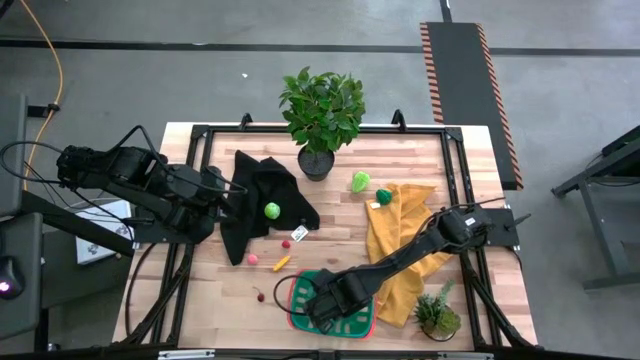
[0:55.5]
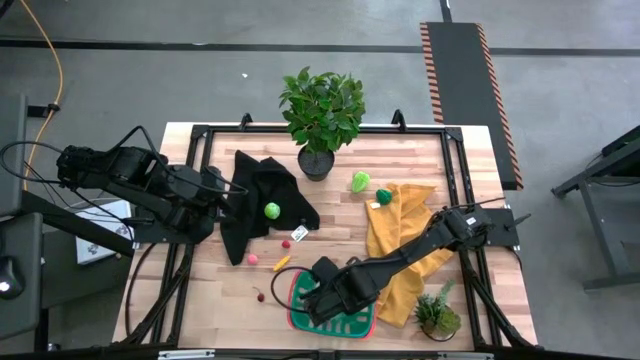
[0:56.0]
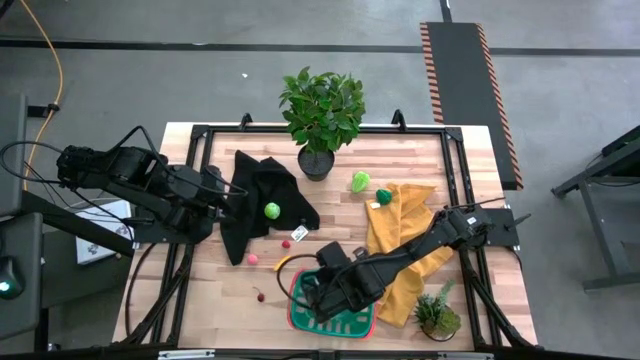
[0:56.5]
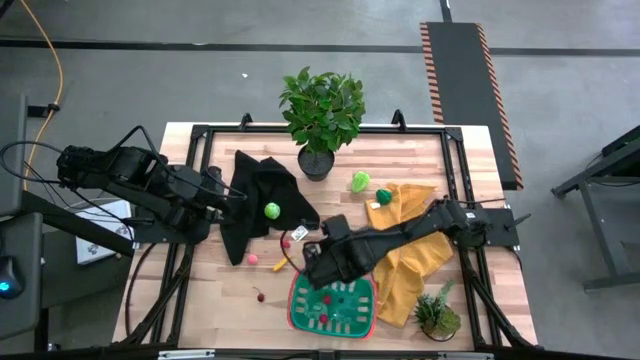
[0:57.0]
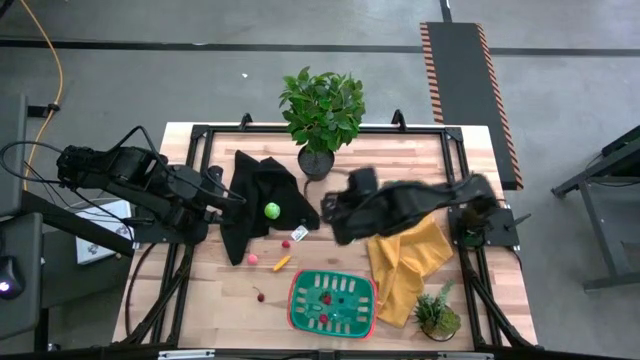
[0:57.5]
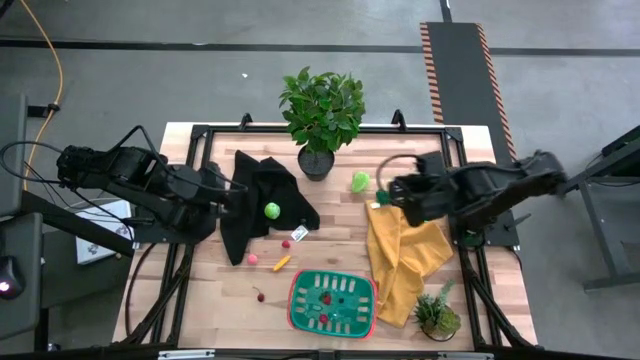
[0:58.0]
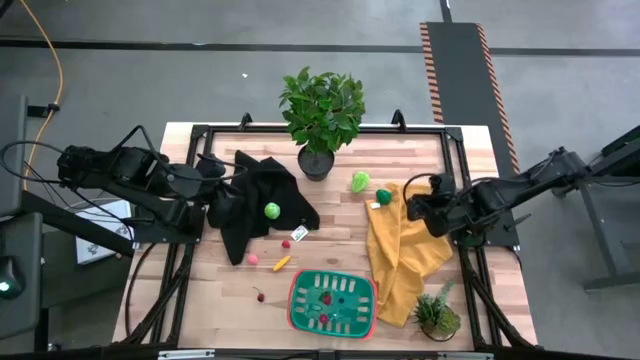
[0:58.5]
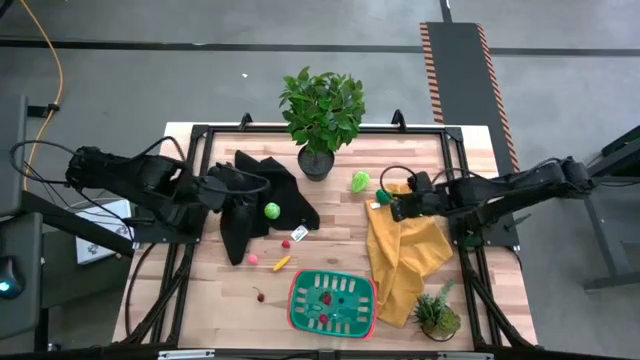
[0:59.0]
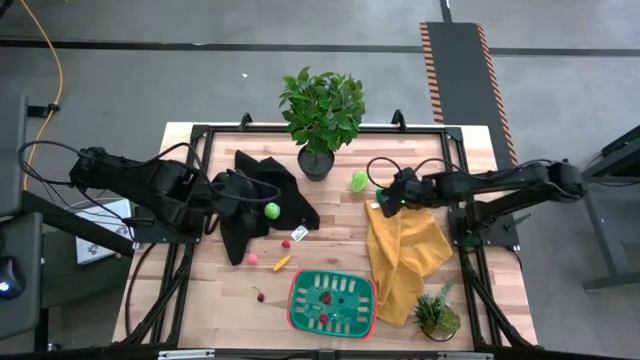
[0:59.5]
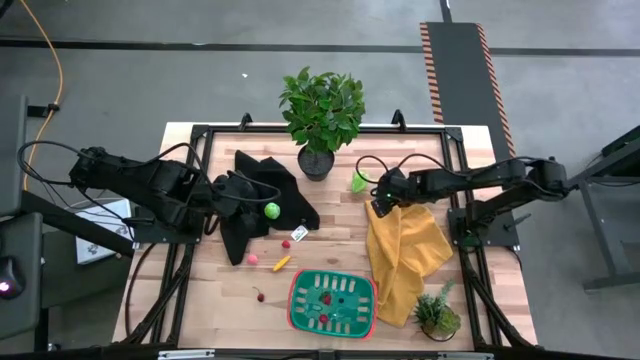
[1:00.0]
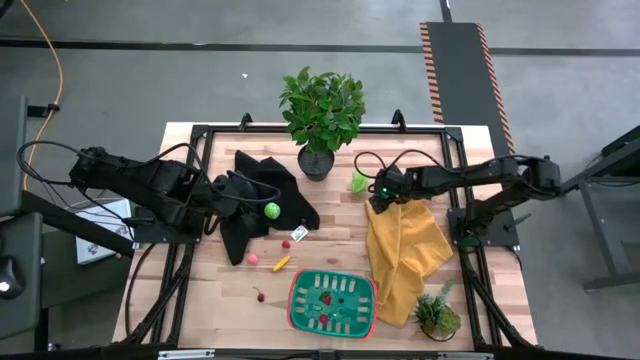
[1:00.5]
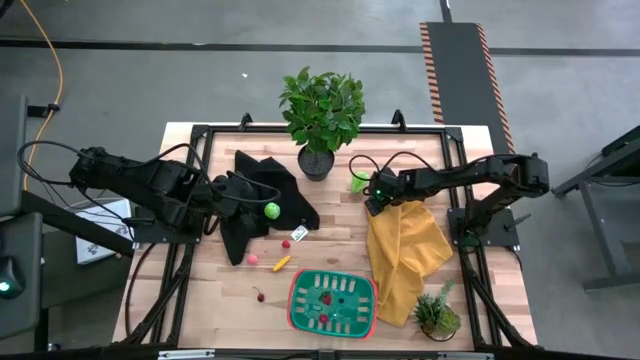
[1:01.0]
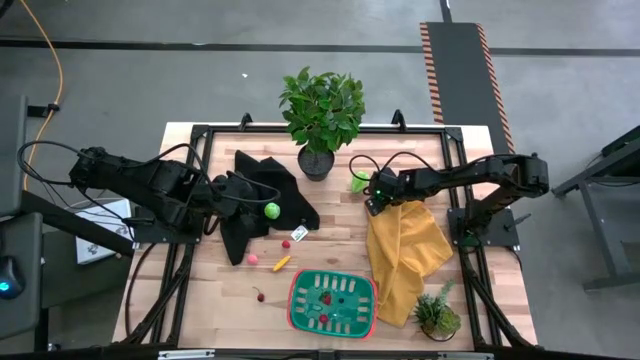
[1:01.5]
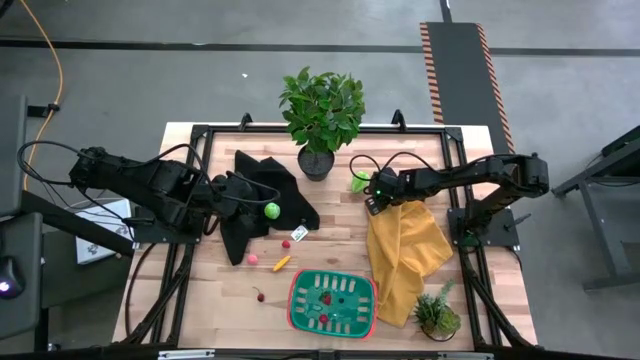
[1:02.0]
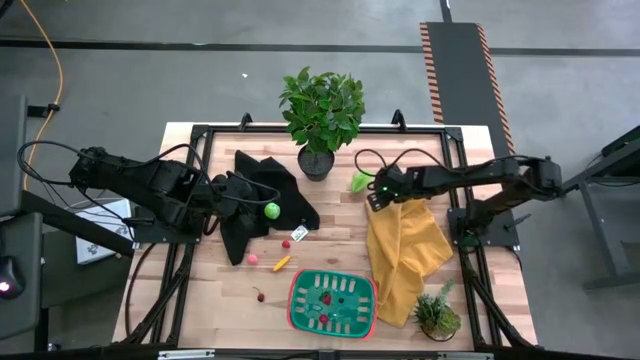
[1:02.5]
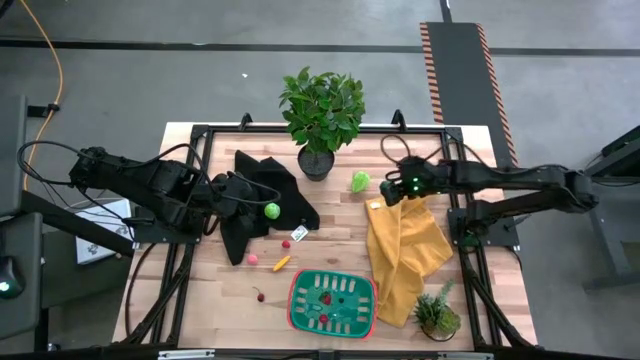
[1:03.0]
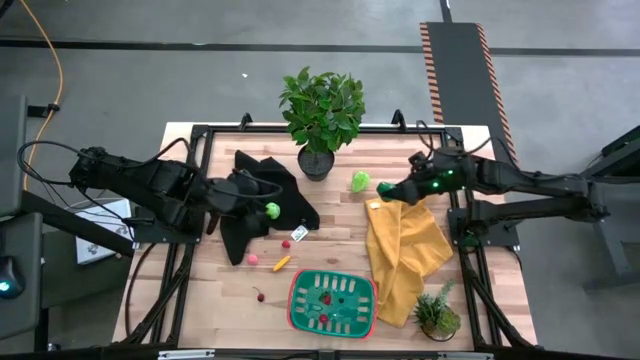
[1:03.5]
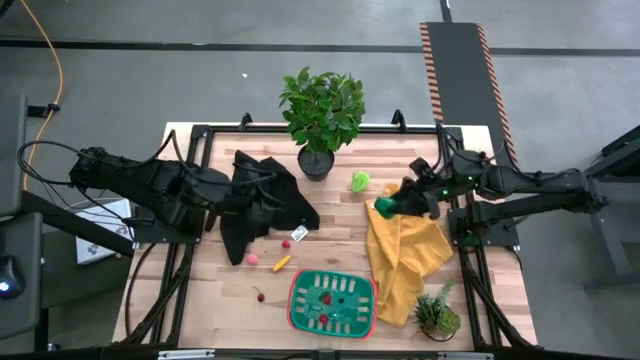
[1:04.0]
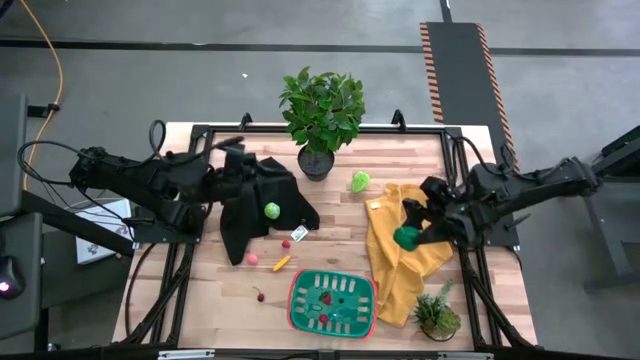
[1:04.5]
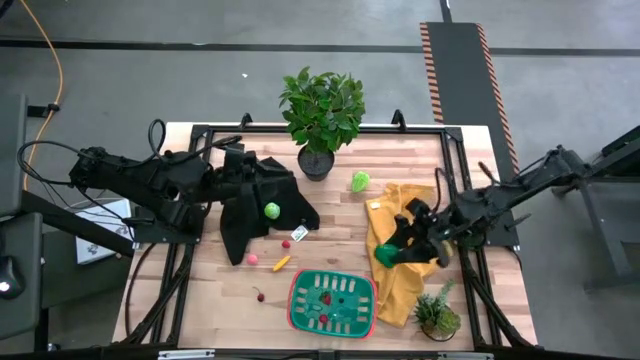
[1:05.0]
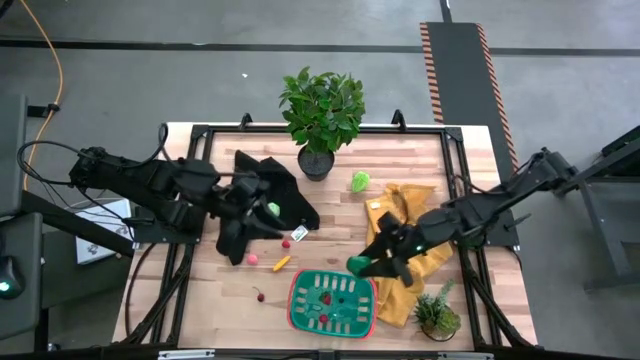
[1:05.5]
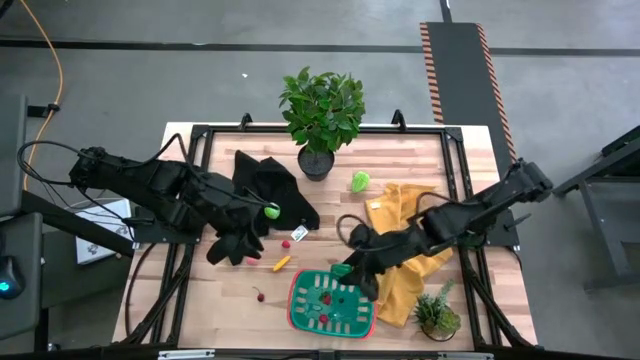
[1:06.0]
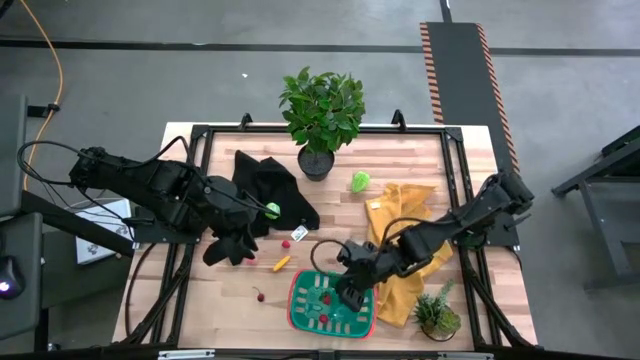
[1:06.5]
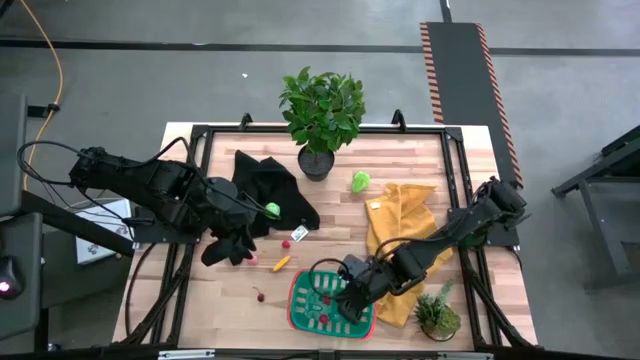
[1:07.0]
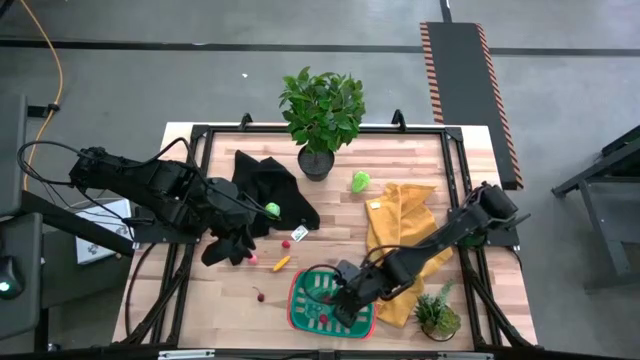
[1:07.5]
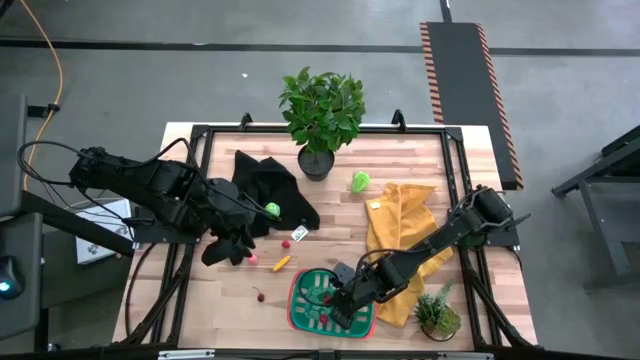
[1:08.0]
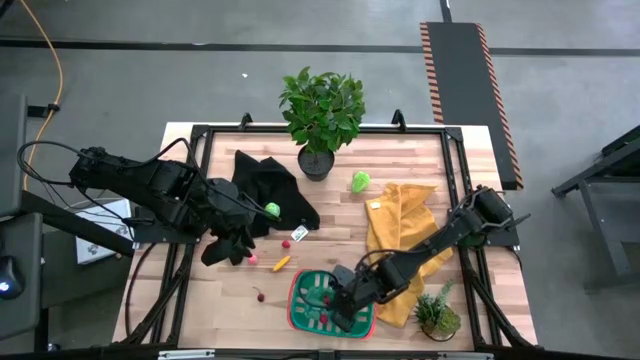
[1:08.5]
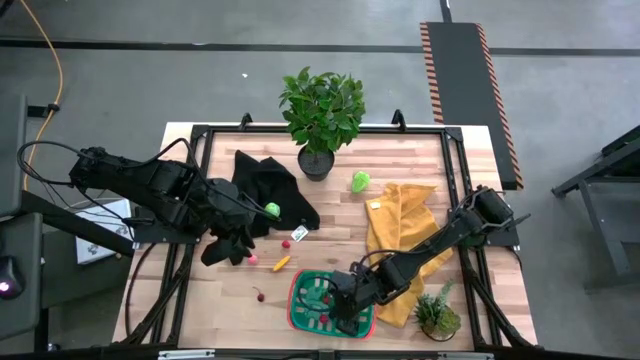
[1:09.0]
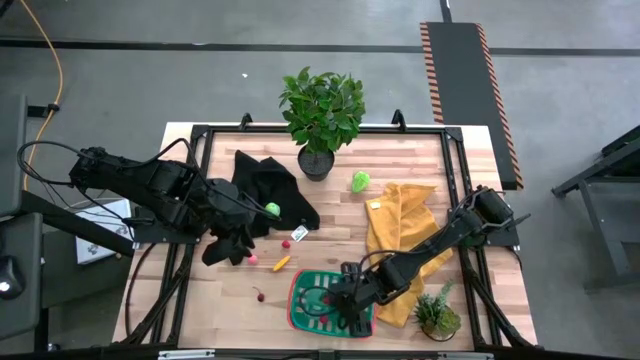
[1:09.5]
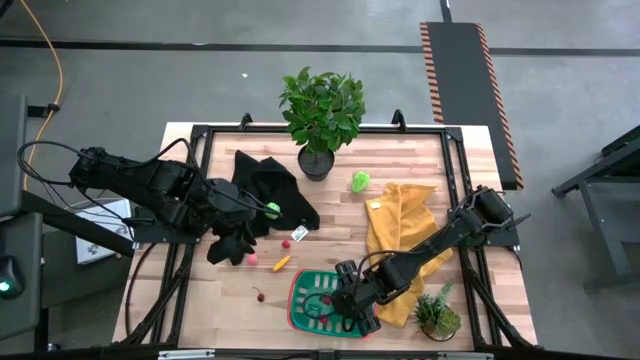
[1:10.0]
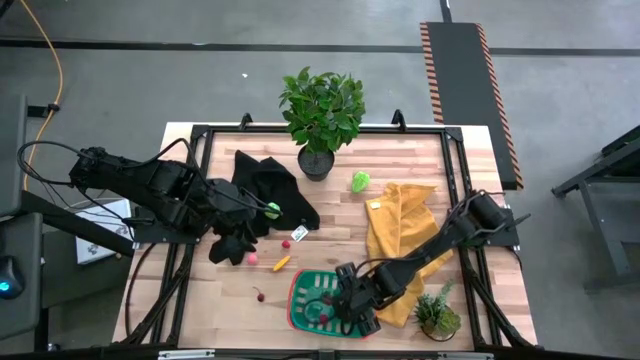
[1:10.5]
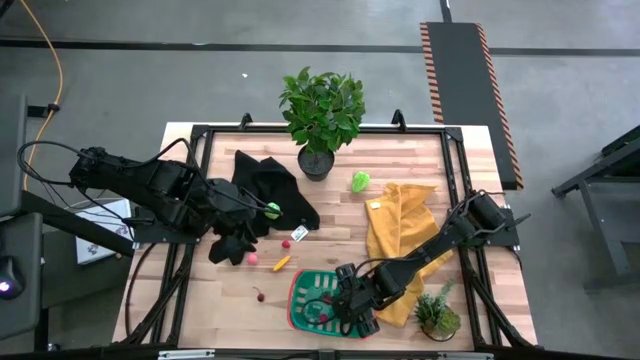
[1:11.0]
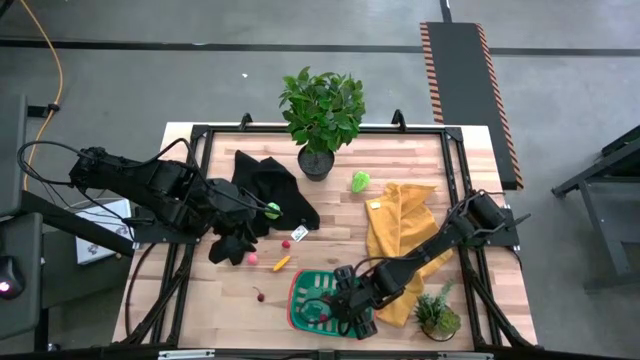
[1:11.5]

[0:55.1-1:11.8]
Task: Pick and placing Produce into tupperware
Put the green bell pepper into the blue bin

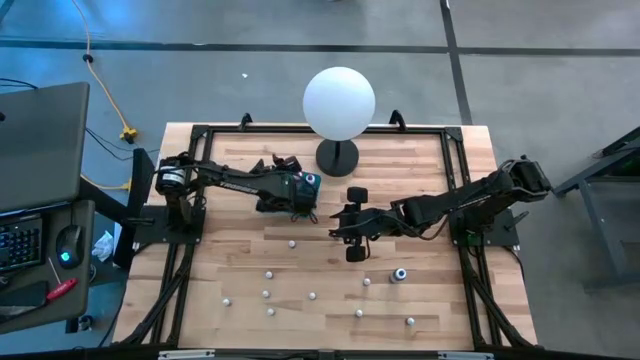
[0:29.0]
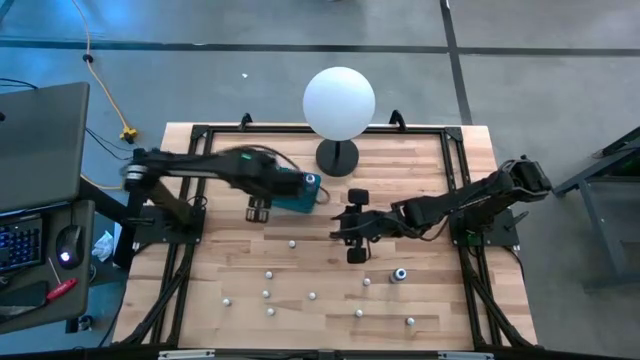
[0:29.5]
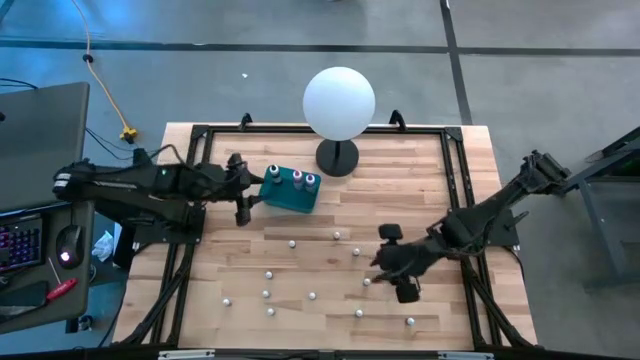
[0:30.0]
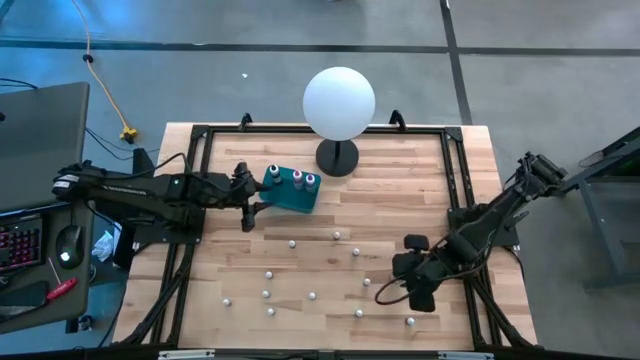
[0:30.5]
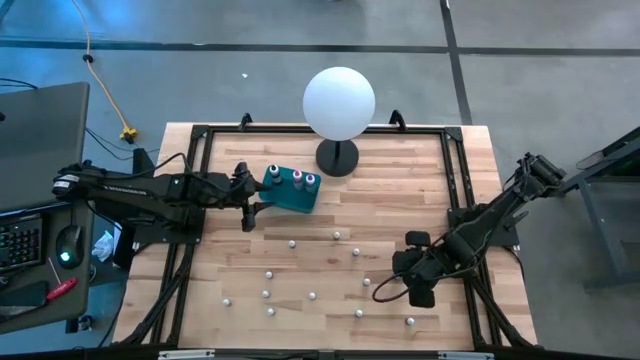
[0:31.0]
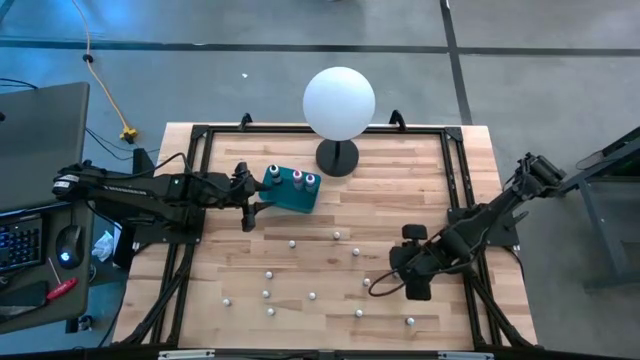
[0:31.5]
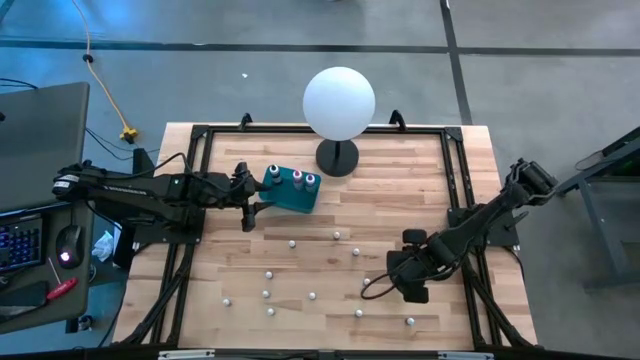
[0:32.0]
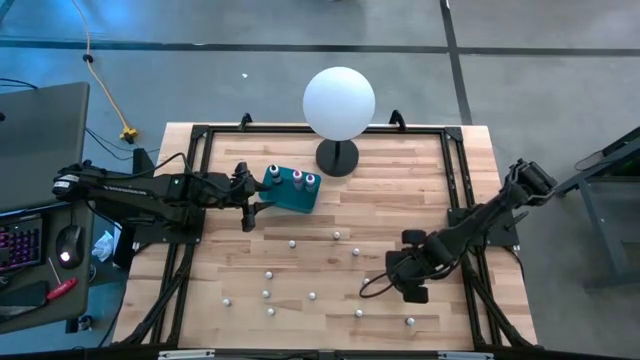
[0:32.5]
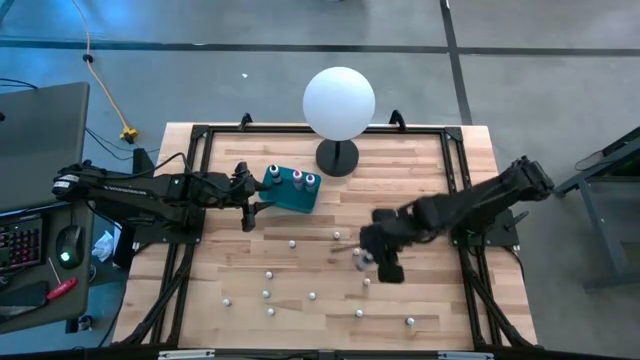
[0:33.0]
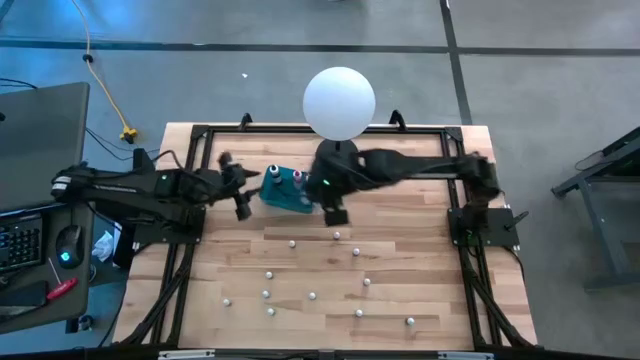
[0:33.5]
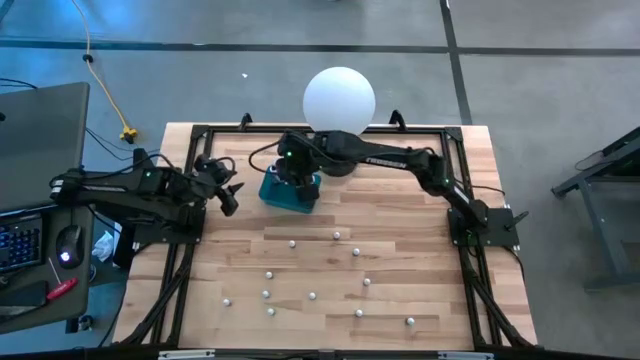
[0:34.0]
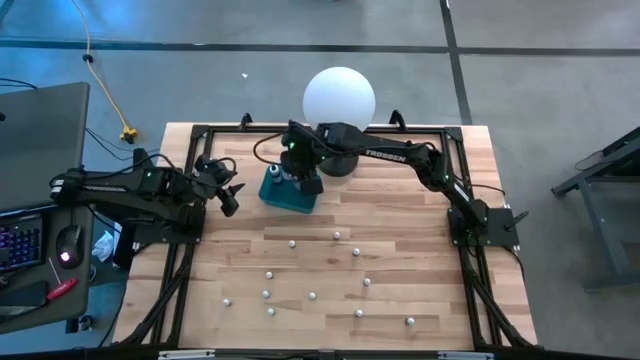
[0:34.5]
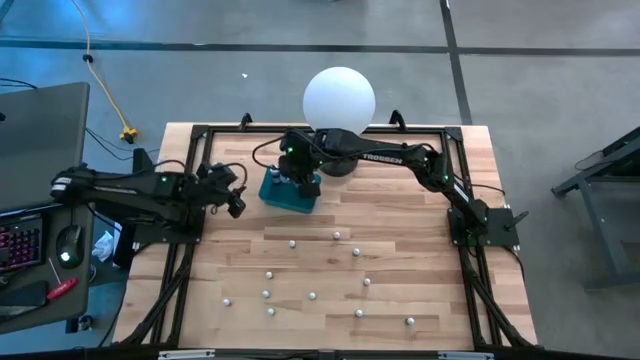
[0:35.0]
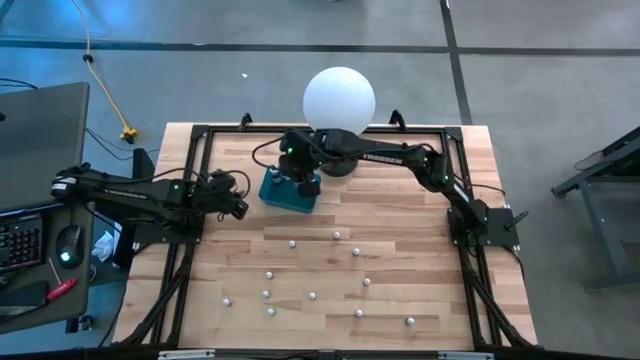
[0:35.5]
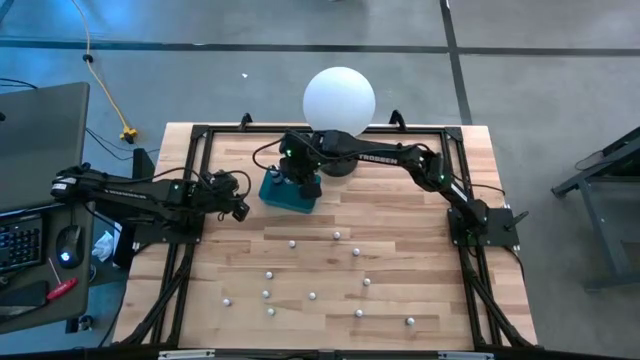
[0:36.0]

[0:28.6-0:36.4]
Task: Pick & Place food coloring
Put the large blue food coloring bottle into the blue bin
